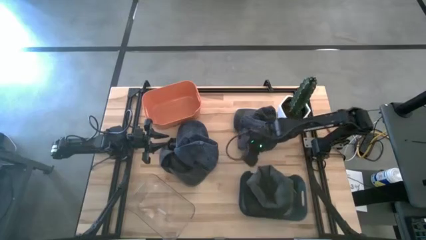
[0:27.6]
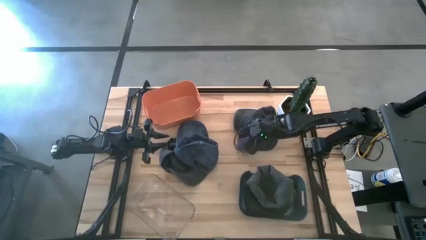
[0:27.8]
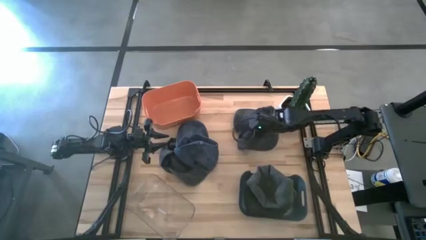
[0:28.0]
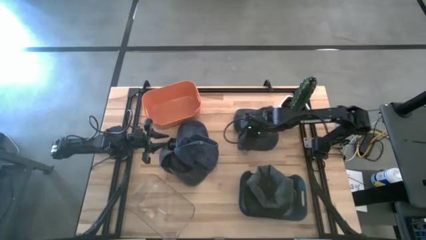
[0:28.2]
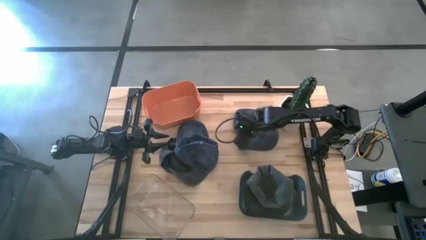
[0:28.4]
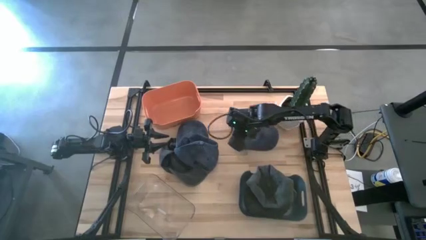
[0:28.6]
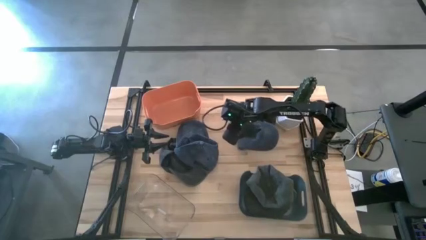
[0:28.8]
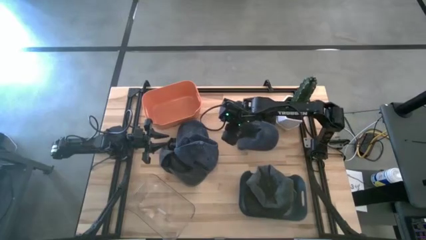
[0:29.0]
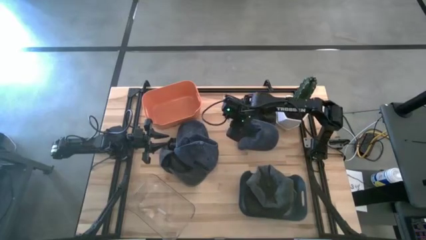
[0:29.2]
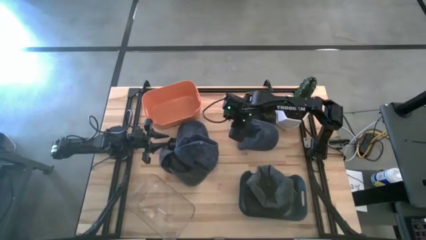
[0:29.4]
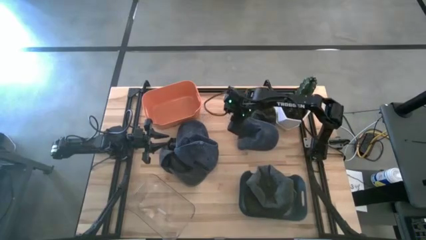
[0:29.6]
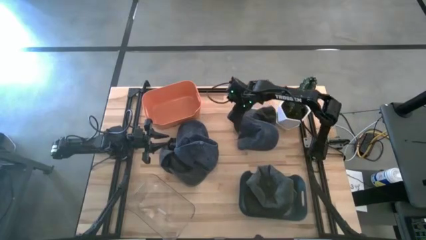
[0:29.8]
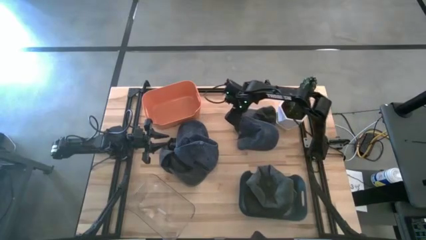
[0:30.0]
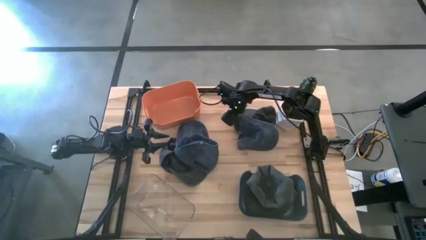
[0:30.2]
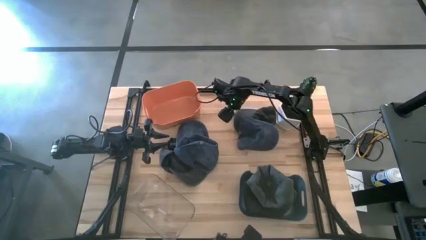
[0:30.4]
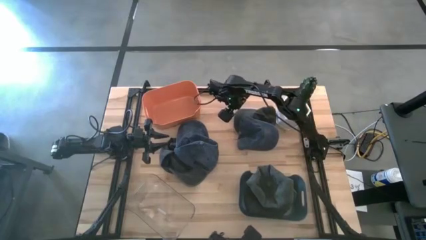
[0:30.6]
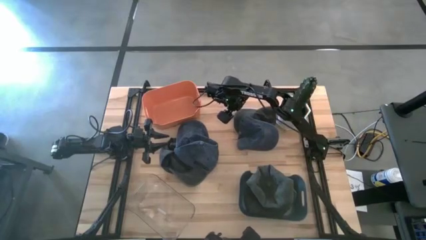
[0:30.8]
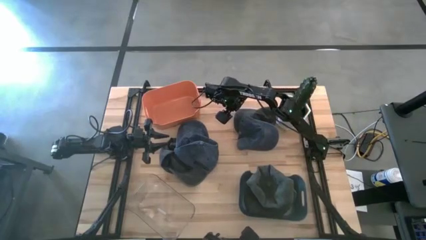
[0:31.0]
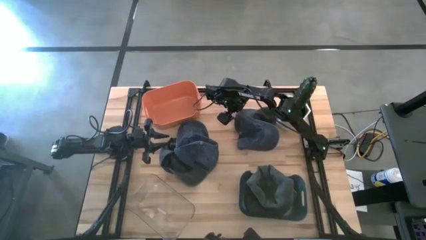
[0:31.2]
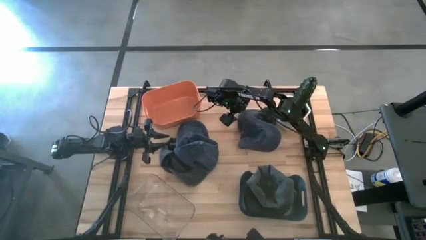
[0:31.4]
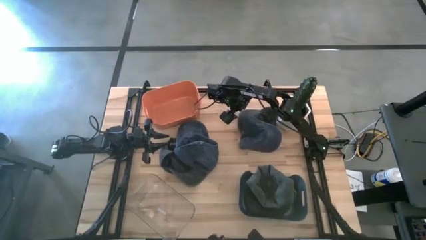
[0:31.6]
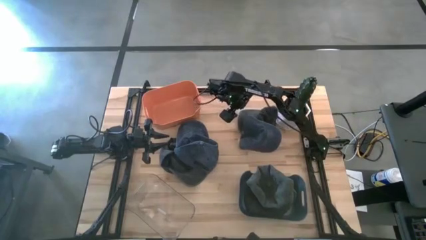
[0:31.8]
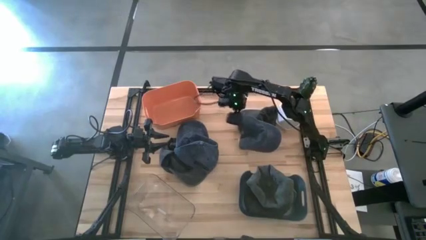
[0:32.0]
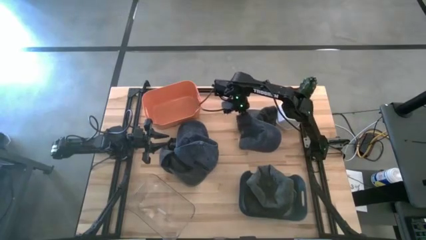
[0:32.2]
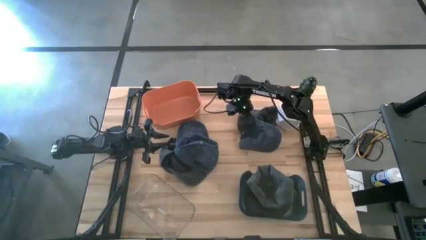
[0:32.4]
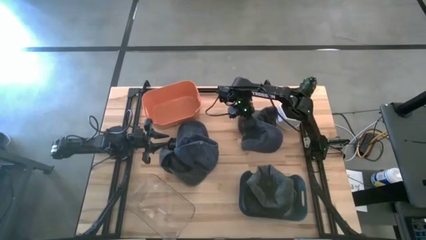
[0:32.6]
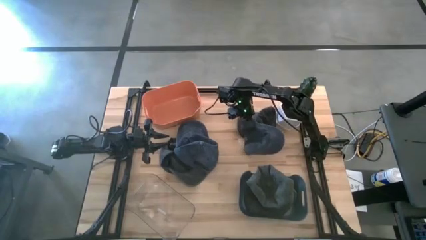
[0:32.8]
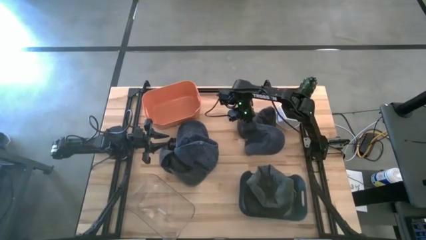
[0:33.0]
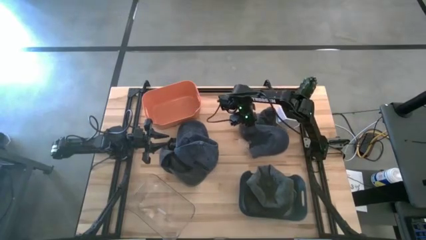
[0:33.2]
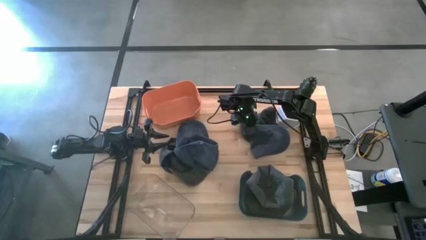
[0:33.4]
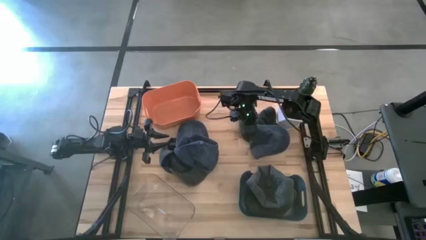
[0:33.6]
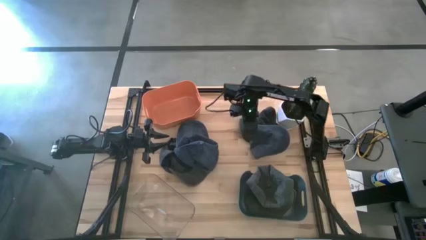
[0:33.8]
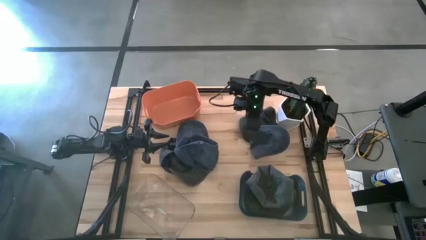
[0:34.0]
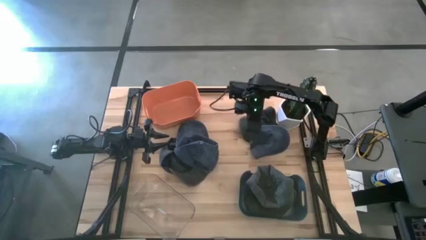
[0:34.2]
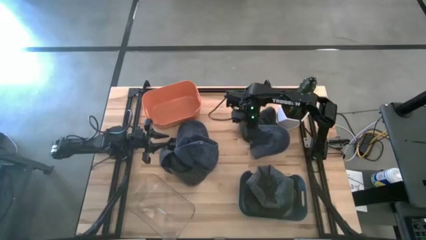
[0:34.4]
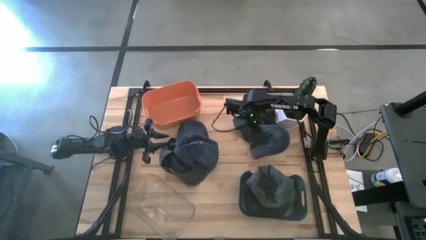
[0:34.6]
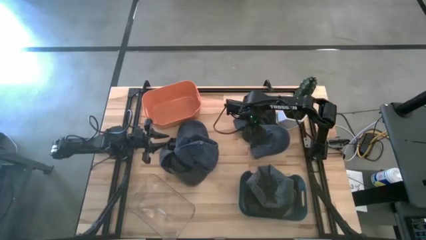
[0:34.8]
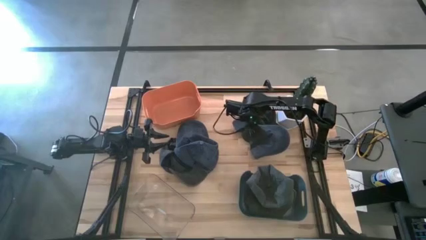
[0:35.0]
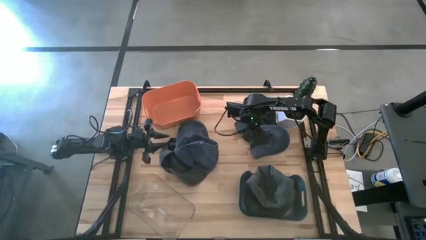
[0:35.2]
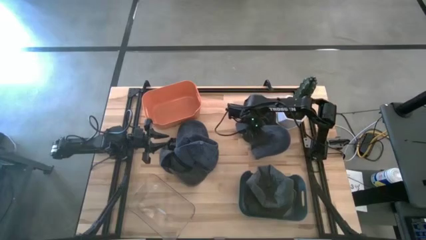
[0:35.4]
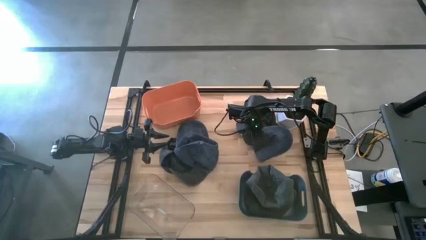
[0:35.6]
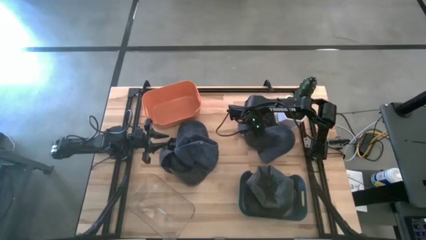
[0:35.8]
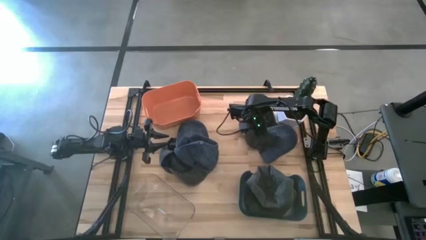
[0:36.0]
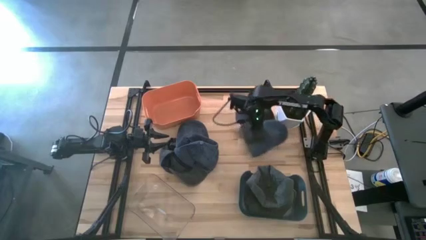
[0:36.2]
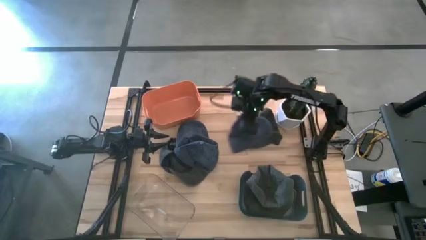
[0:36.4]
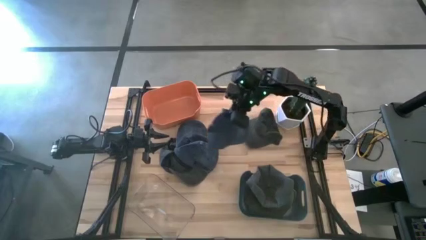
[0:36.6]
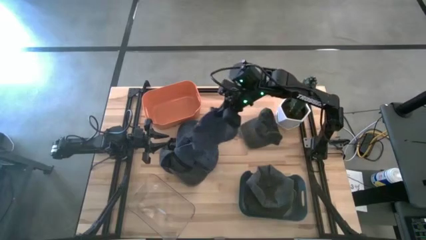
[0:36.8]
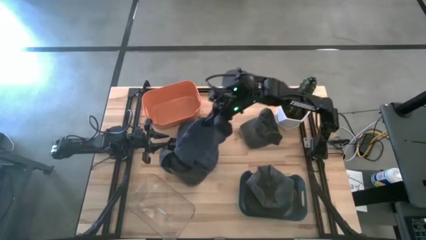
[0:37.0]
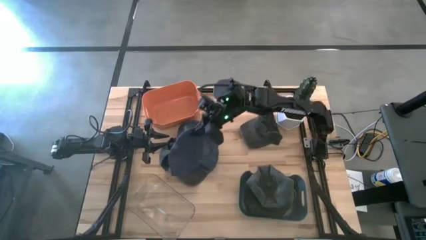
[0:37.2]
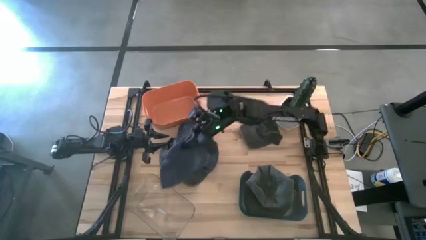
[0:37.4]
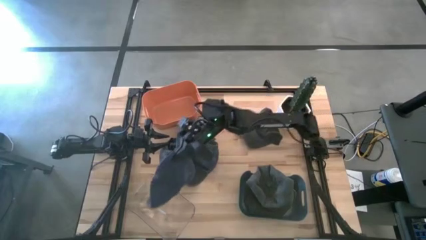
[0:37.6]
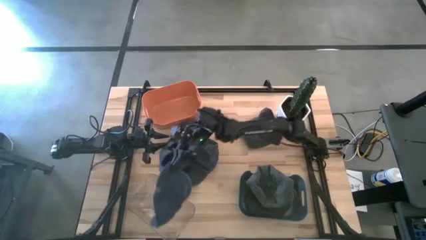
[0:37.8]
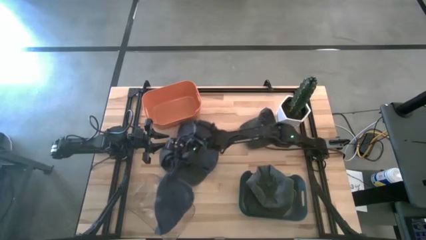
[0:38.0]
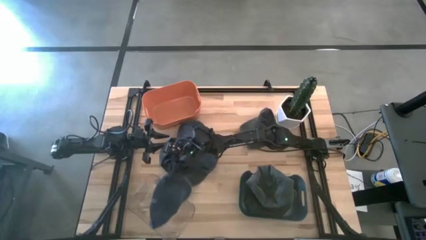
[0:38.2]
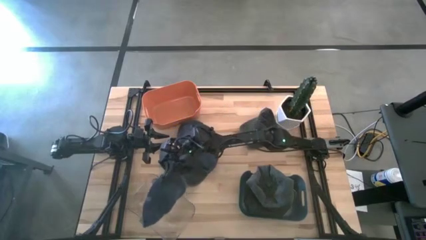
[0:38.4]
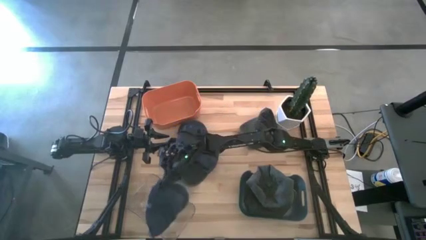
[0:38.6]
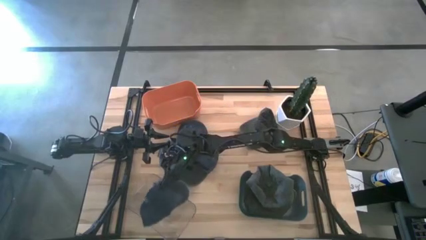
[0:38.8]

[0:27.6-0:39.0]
Task: Pick & Place hat
Put the right blue cap into the transparent bin

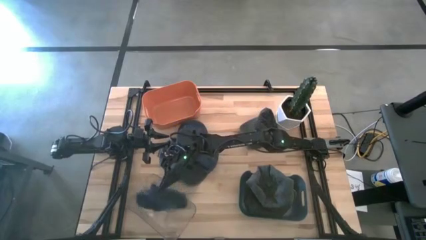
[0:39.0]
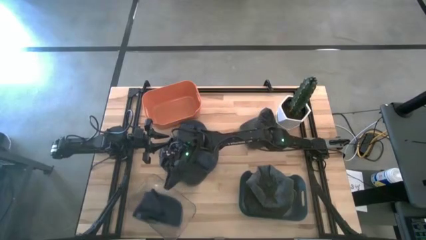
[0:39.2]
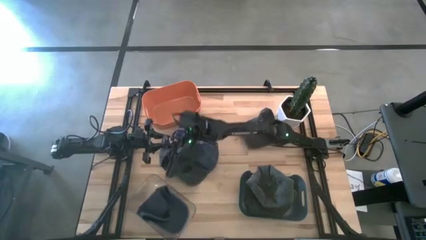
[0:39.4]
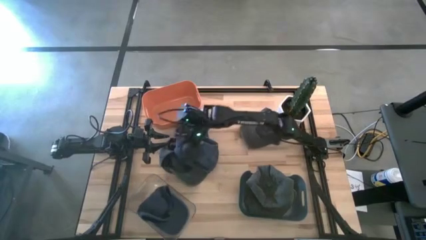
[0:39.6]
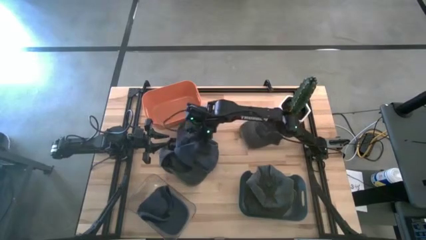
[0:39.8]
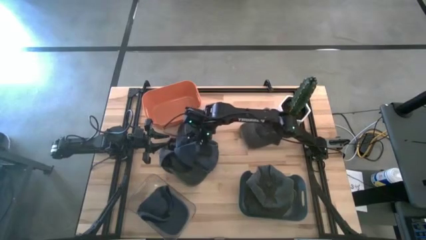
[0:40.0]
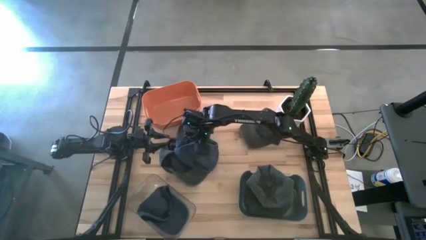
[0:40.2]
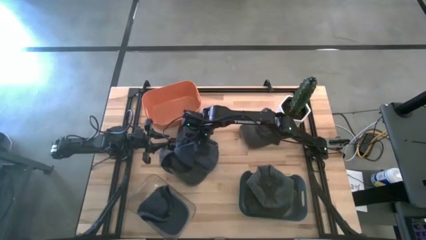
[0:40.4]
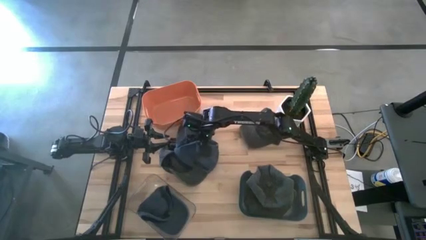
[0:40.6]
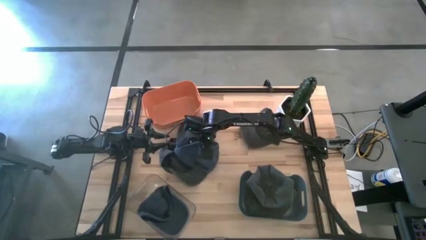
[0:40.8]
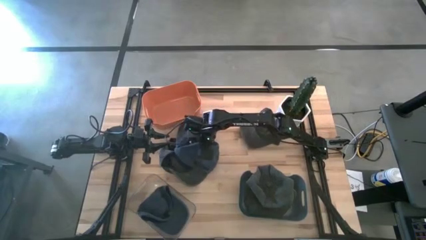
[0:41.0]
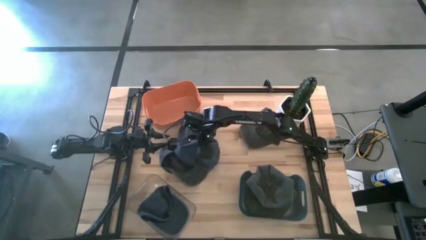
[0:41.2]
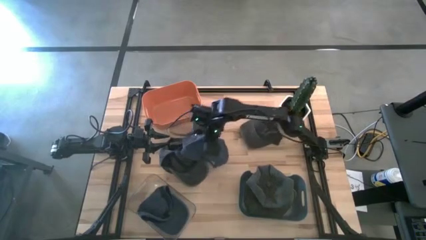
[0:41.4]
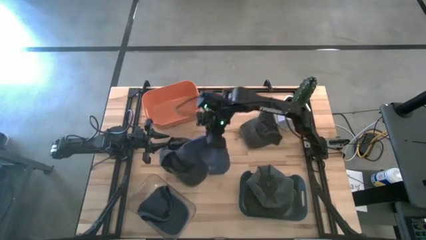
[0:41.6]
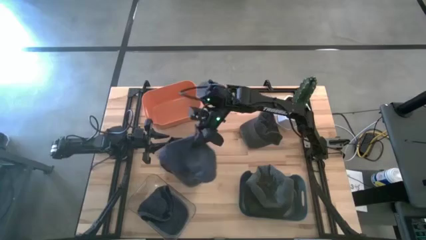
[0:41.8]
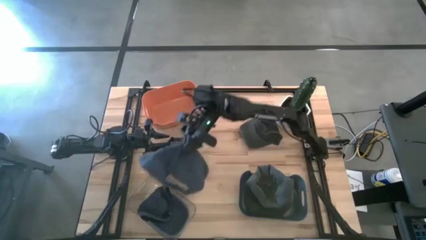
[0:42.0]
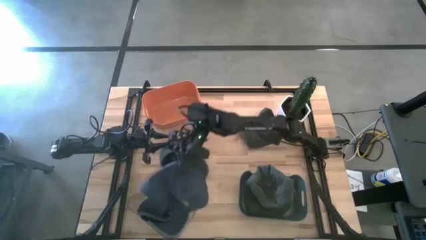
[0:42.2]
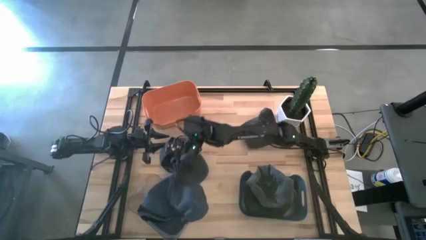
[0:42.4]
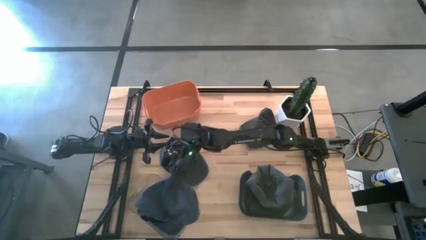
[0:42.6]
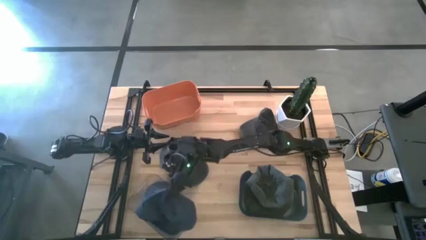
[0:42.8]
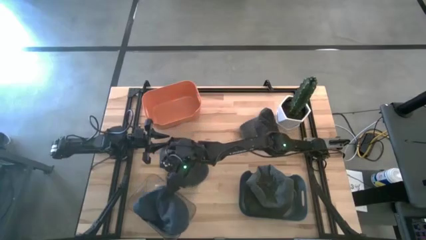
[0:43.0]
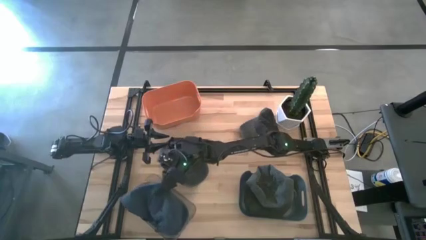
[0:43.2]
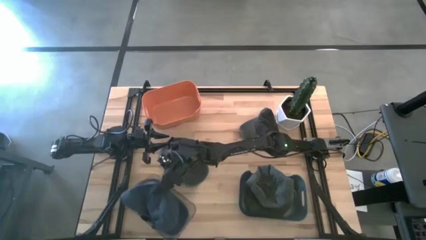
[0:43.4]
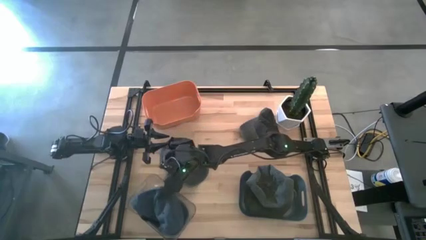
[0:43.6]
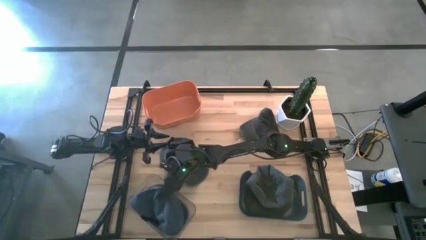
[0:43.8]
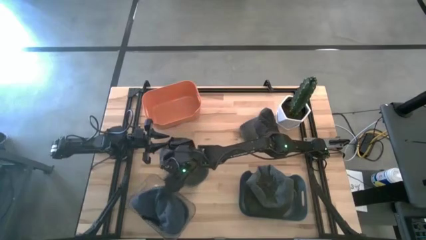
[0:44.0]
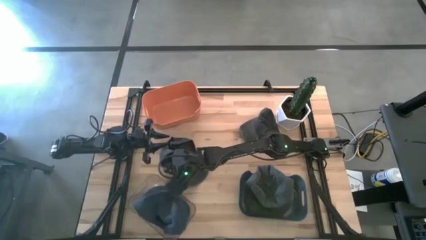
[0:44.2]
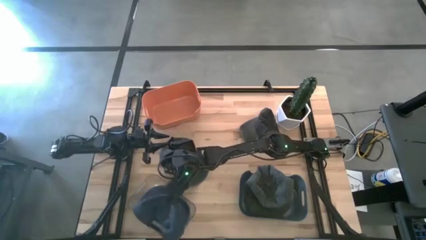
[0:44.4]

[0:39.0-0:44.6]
Put the blue cap into the transparent bin
